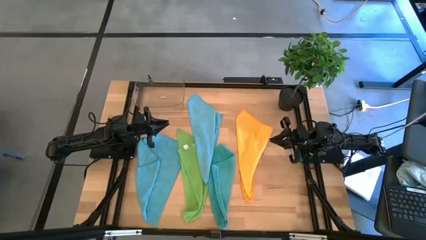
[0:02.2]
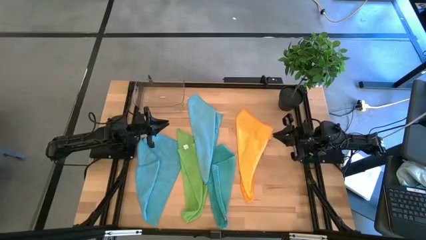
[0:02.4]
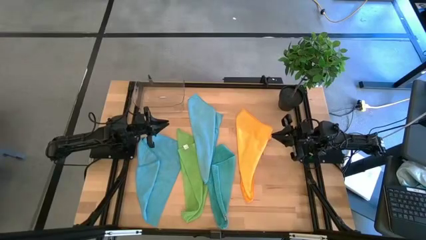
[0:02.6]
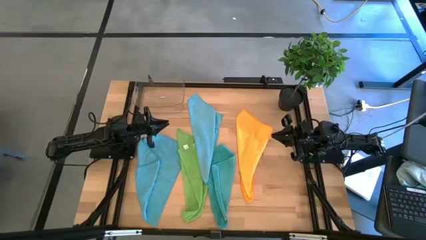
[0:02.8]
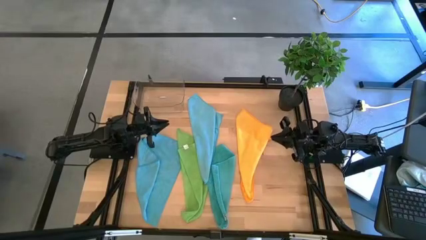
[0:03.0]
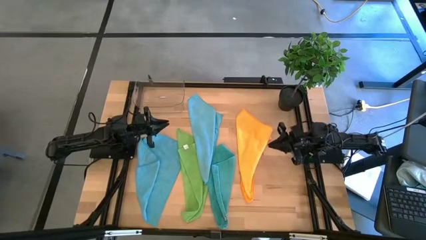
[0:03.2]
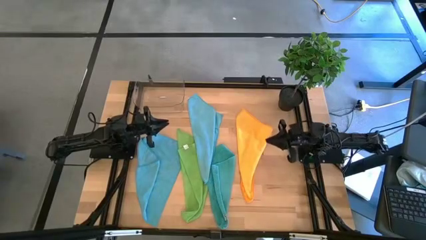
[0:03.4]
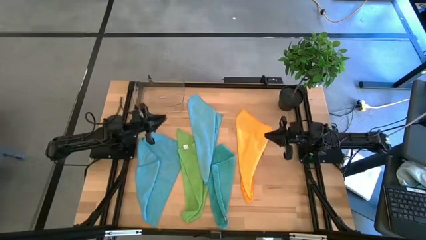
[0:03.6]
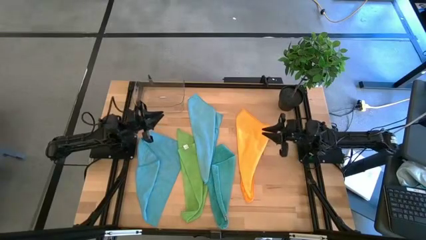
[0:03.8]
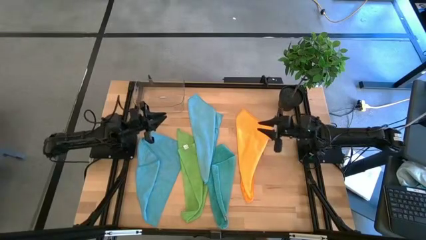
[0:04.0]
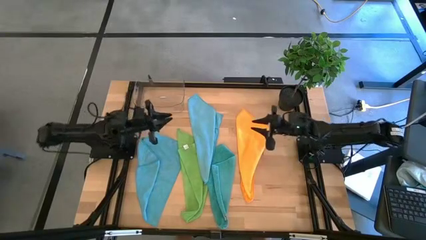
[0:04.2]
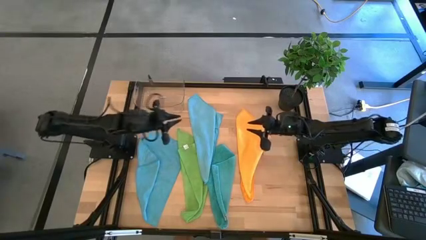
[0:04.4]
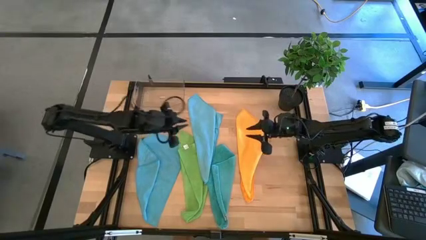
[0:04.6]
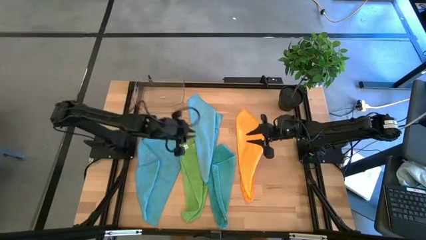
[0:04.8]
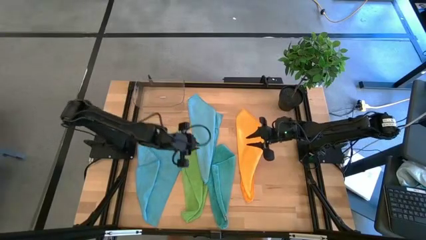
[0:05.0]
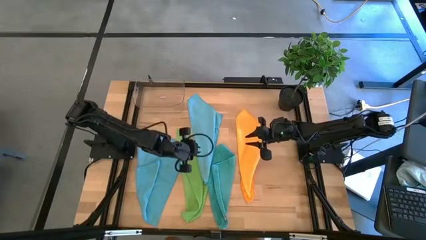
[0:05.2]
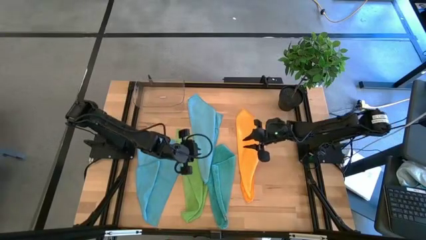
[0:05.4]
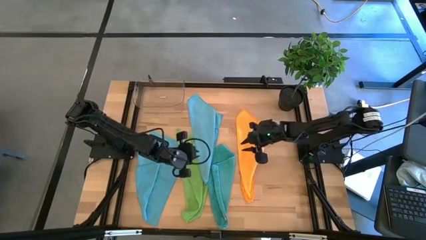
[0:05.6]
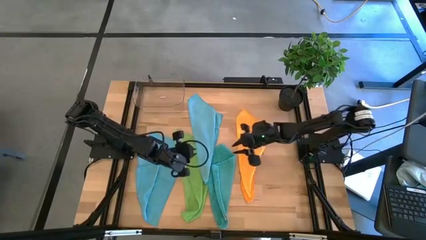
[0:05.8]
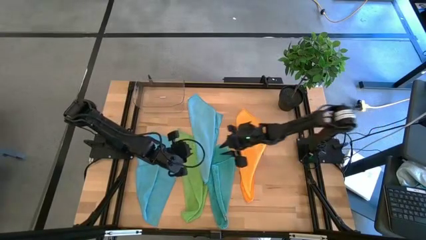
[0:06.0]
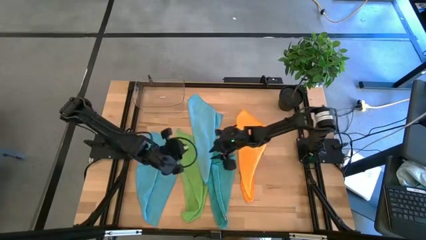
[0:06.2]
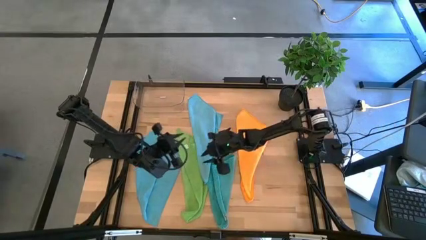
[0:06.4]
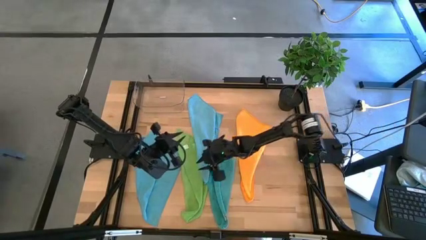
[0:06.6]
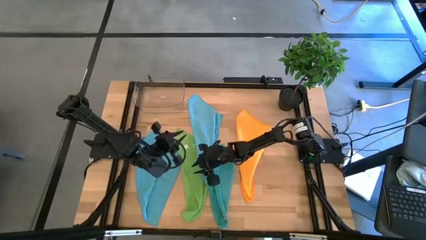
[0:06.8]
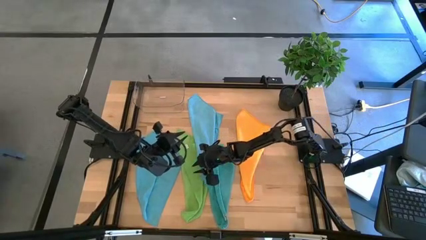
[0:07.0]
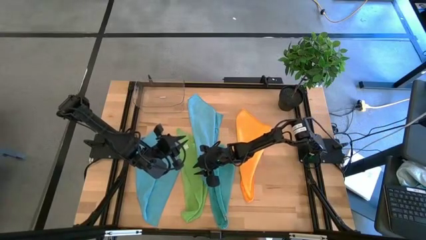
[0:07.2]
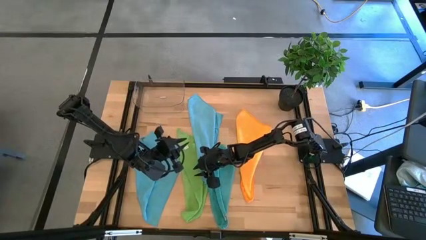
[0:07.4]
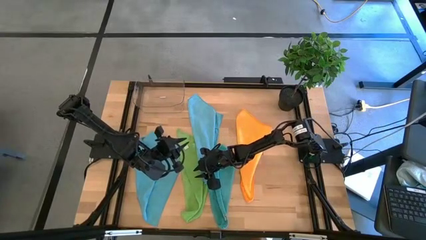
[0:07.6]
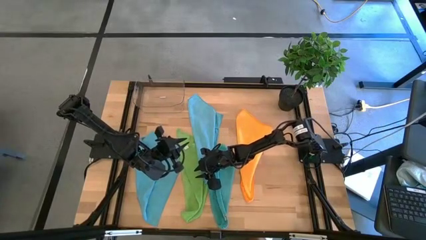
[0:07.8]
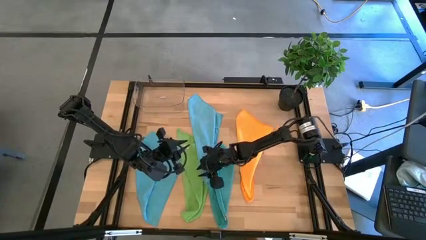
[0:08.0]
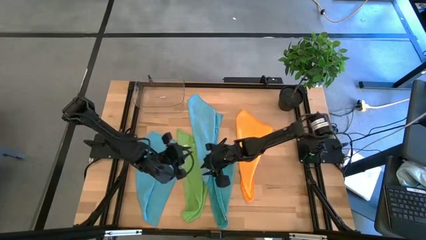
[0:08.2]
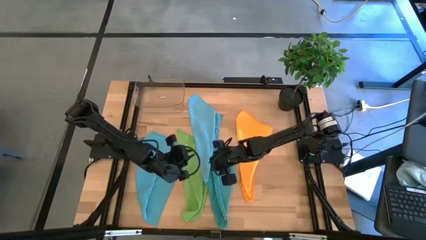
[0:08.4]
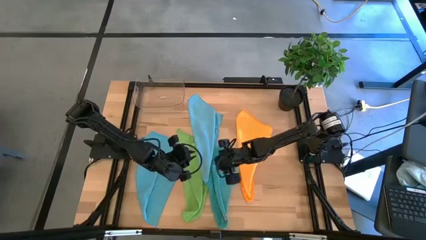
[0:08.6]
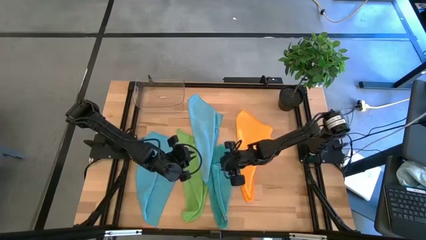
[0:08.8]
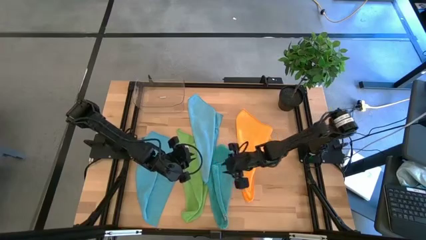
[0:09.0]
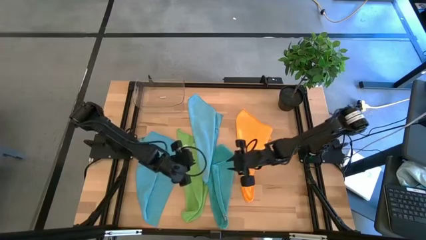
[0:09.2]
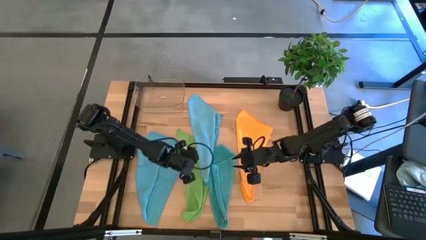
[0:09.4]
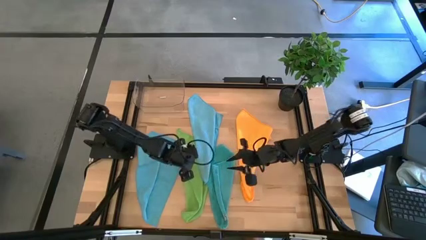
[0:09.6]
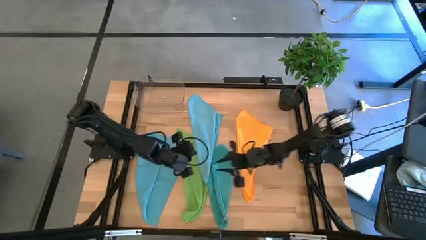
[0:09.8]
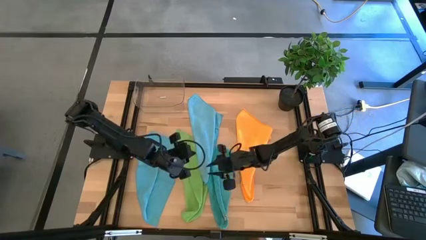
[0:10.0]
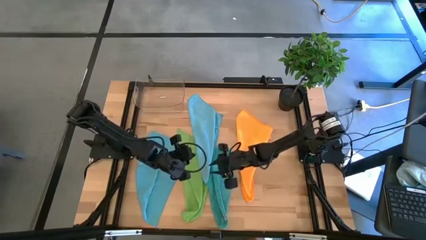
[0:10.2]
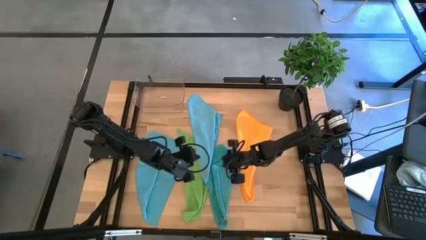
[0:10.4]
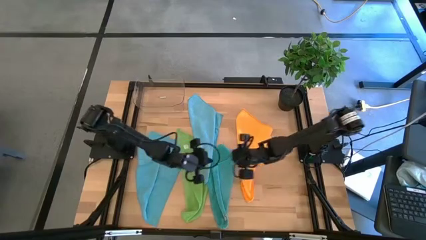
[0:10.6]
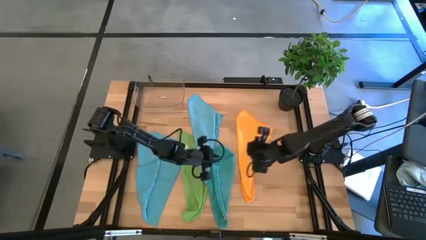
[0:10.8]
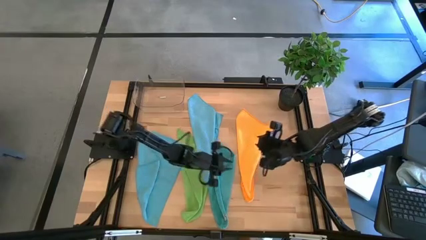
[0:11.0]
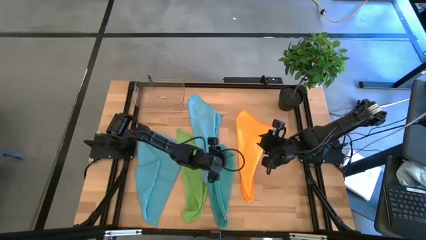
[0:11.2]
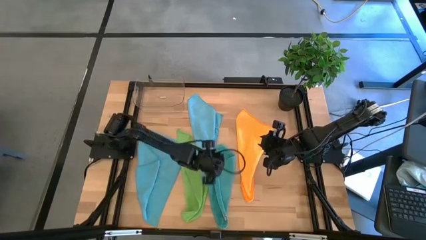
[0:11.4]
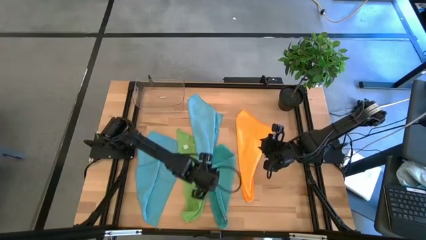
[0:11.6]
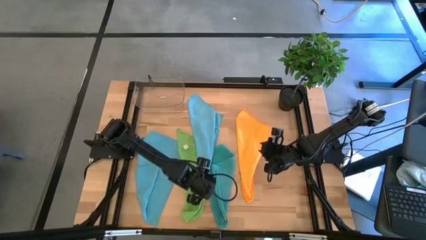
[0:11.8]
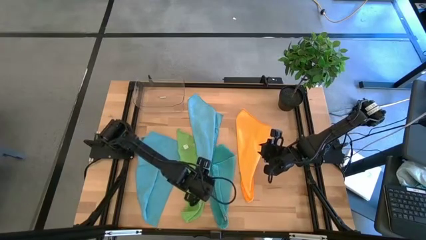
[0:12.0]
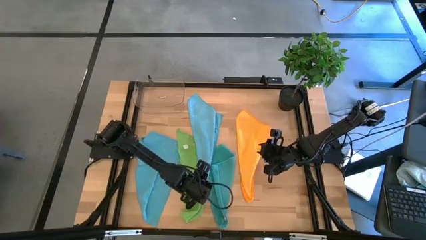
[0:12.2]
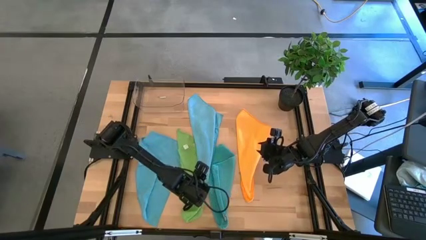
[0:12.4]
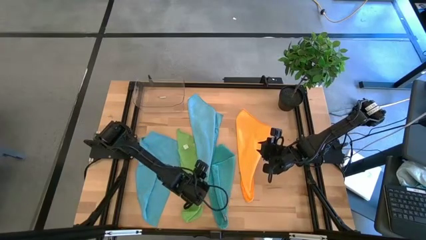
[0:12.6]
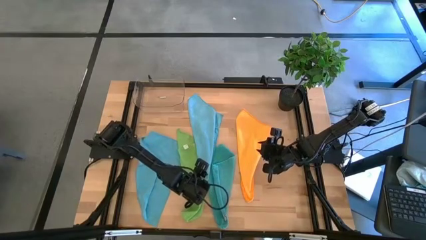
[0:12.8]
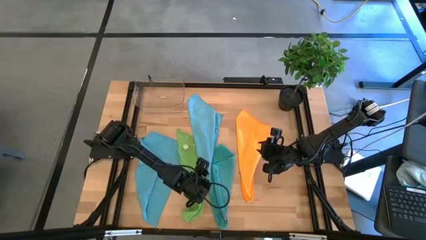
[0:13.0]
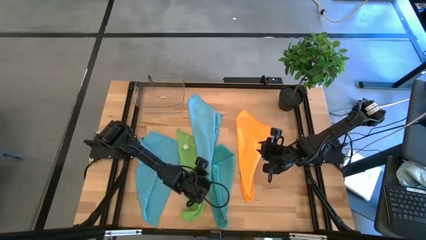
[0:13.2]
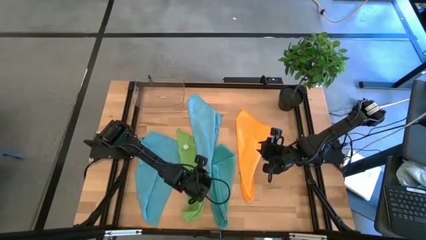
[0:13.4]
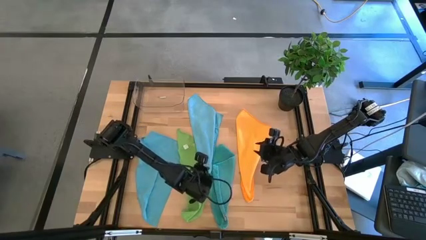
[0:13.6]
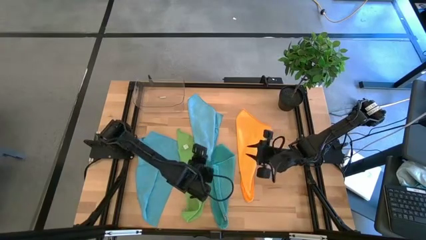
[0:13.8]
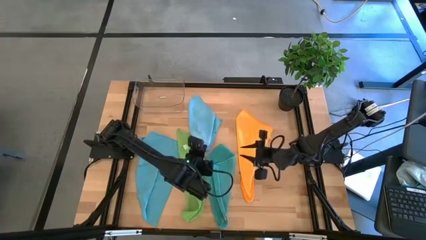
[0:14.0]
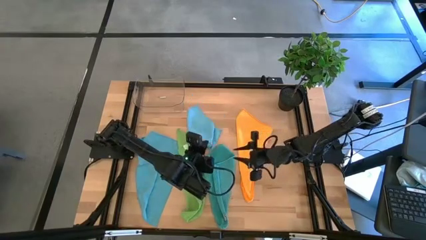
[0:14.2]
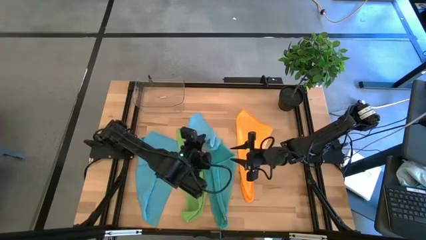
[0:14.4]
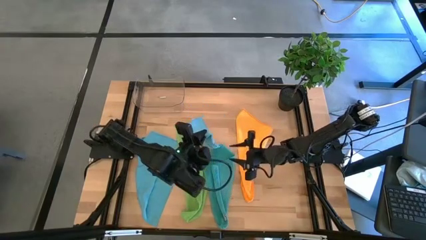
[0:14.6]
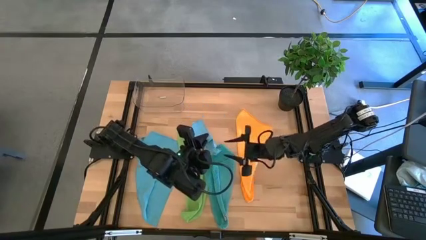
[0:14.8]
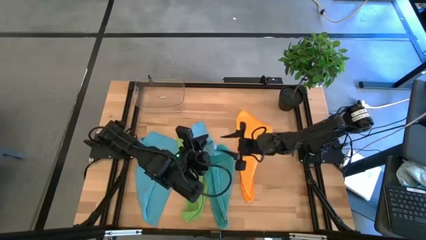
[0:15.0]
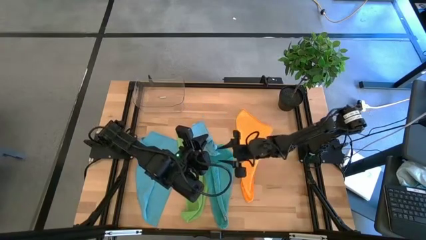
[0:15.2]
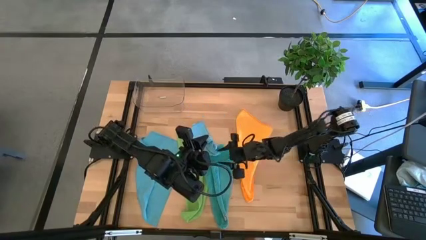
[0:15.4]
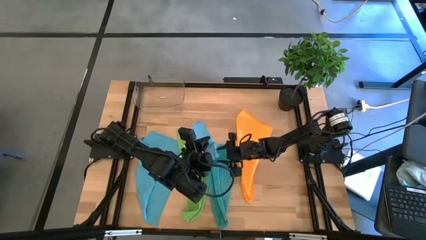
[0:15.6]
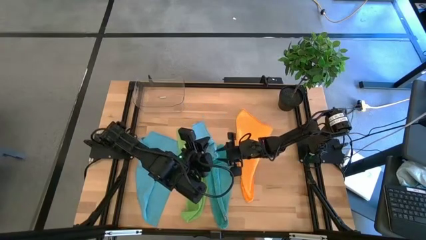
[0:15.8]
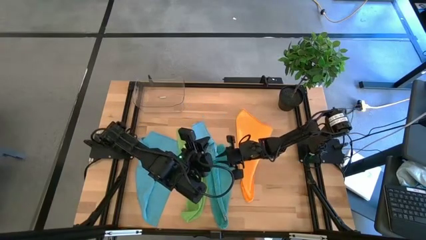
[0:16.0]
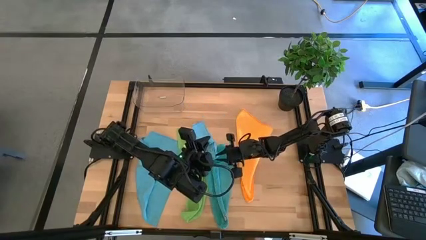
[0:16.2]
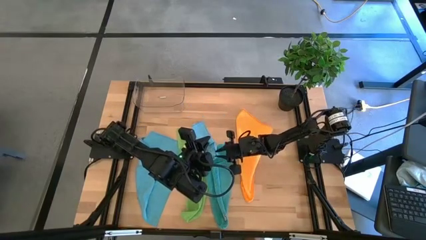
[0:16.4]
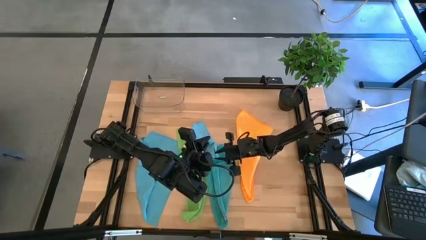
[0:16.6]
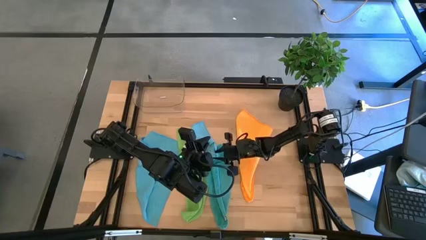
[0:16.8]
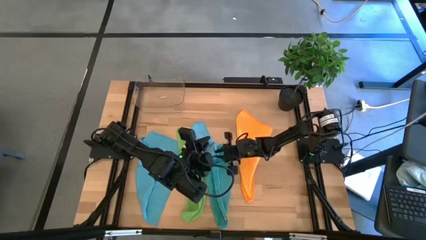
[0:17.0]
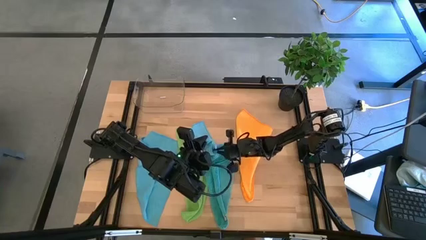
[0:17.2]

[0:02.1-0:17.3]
Task: Fold microfiber towels
Fold the light blue microfiber cloth
